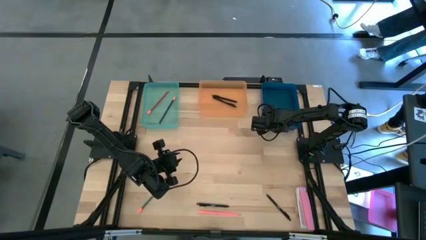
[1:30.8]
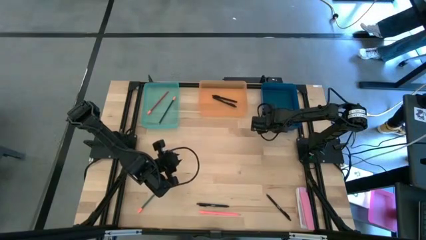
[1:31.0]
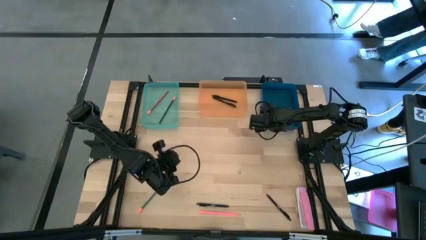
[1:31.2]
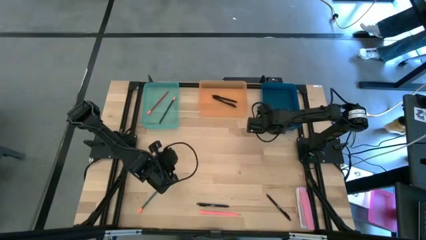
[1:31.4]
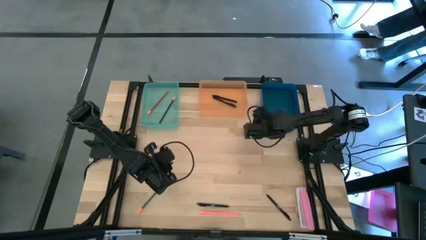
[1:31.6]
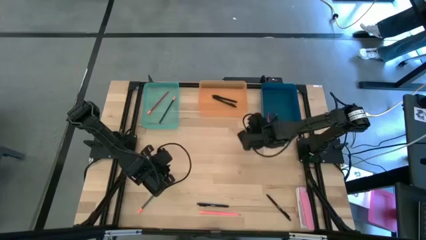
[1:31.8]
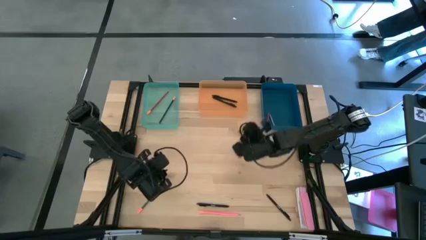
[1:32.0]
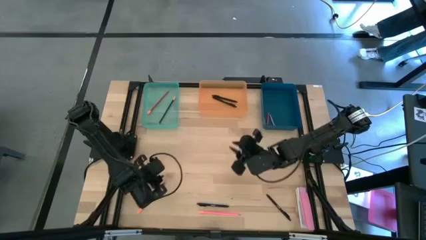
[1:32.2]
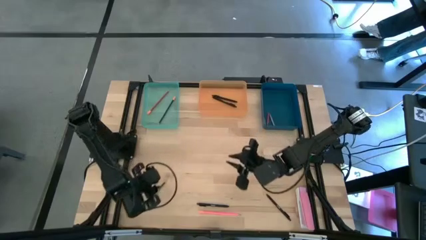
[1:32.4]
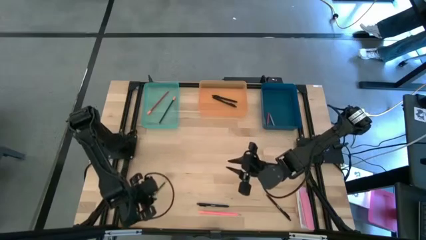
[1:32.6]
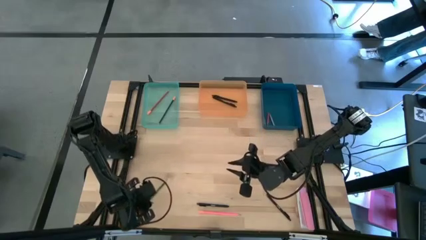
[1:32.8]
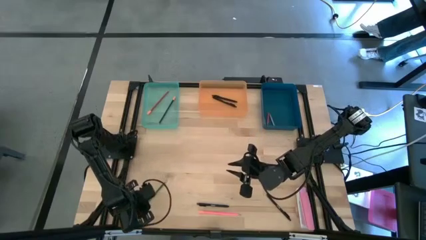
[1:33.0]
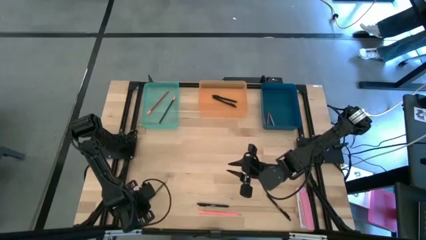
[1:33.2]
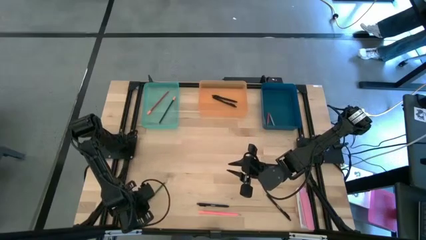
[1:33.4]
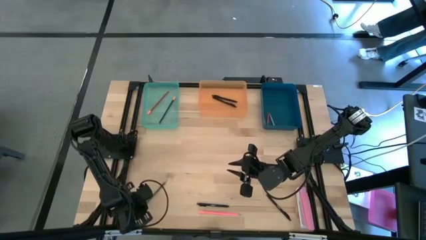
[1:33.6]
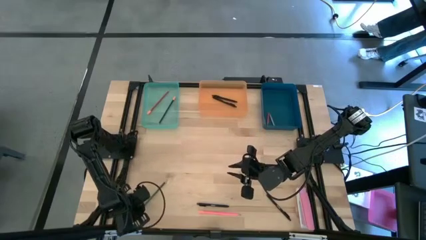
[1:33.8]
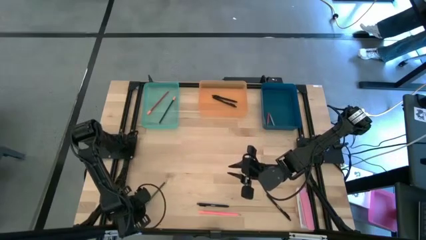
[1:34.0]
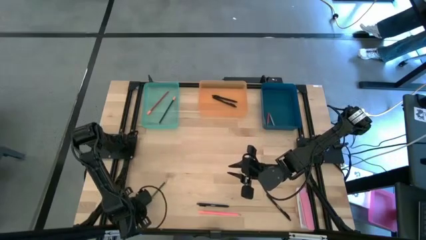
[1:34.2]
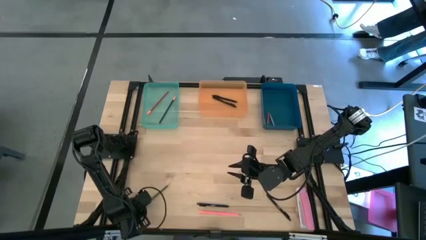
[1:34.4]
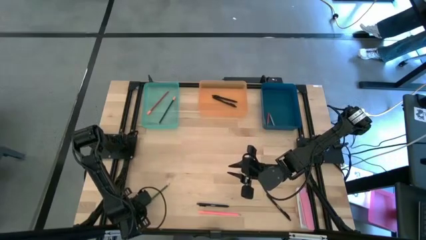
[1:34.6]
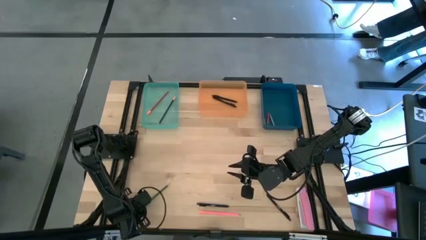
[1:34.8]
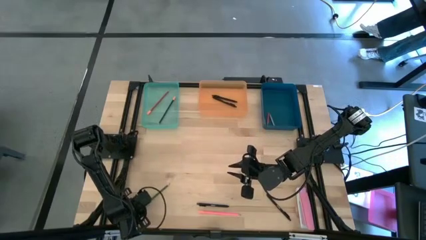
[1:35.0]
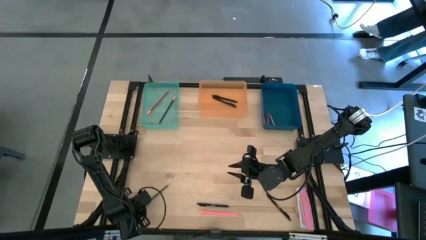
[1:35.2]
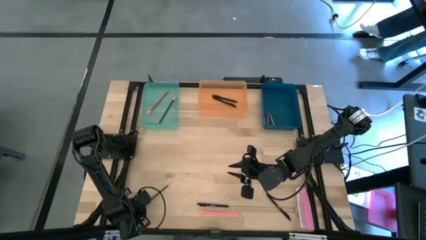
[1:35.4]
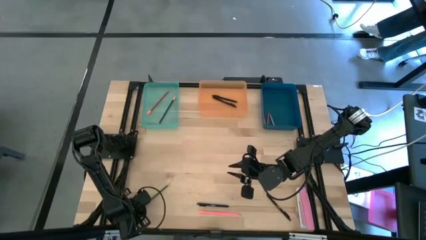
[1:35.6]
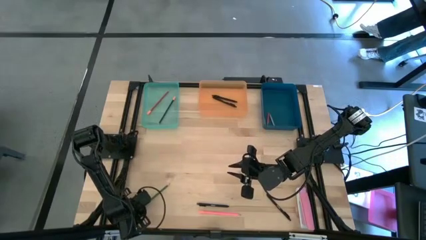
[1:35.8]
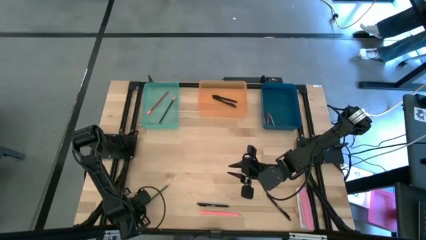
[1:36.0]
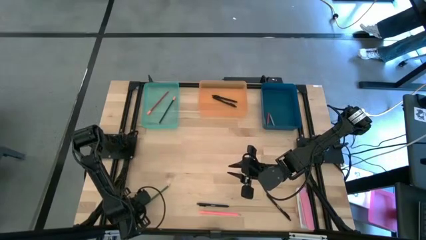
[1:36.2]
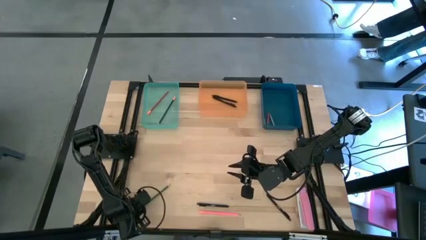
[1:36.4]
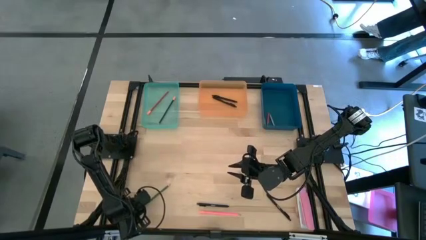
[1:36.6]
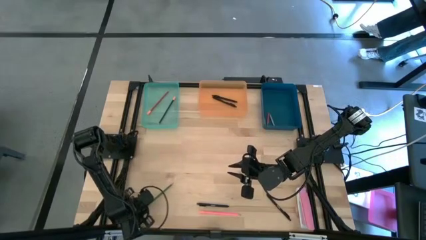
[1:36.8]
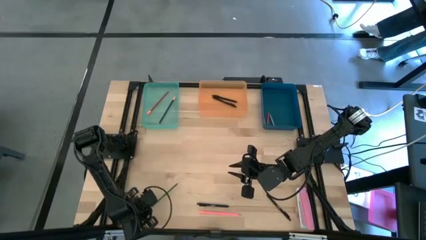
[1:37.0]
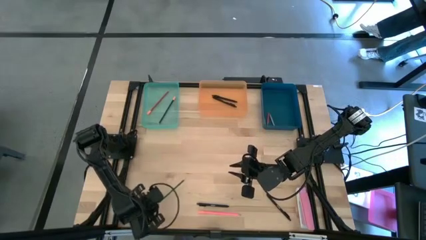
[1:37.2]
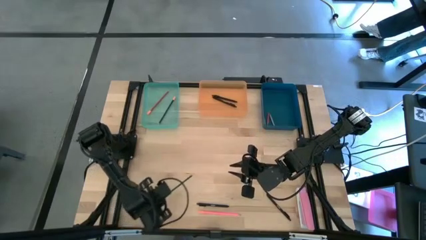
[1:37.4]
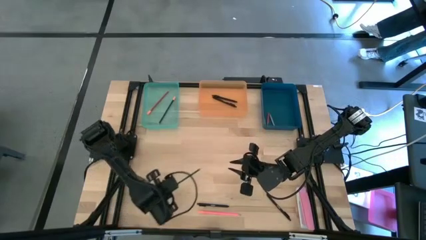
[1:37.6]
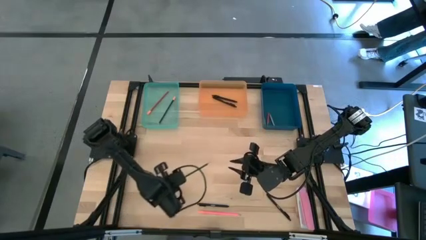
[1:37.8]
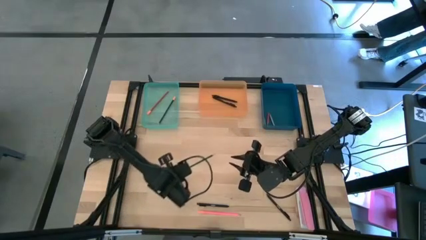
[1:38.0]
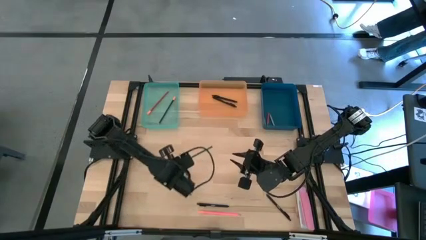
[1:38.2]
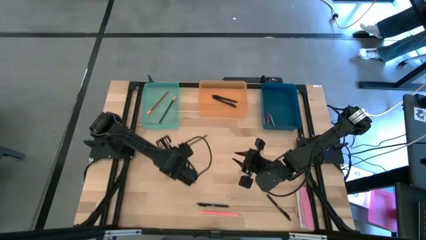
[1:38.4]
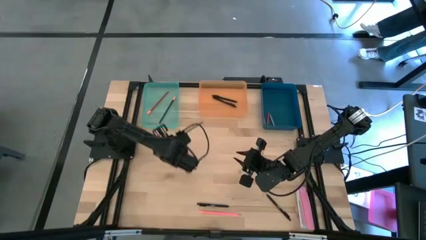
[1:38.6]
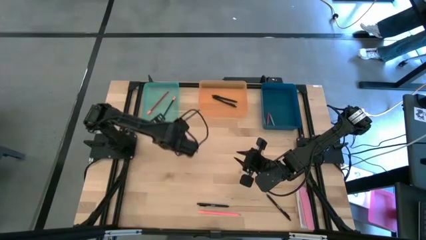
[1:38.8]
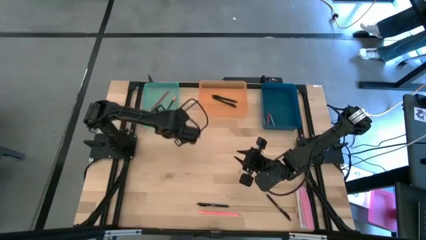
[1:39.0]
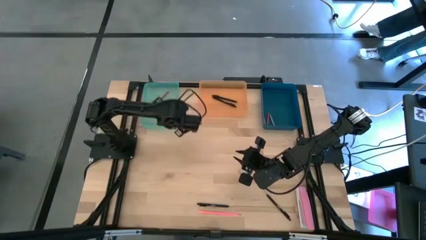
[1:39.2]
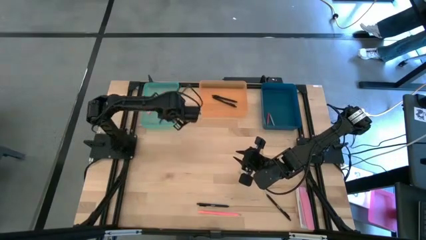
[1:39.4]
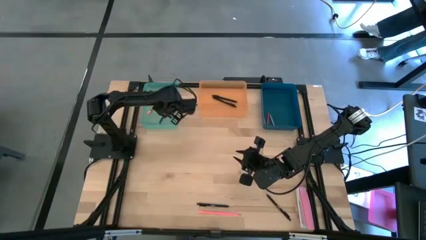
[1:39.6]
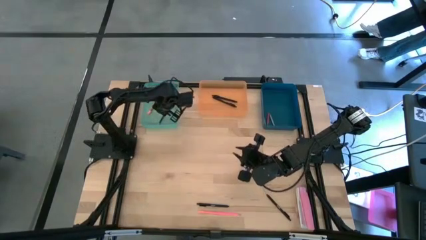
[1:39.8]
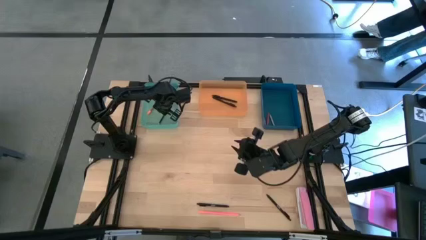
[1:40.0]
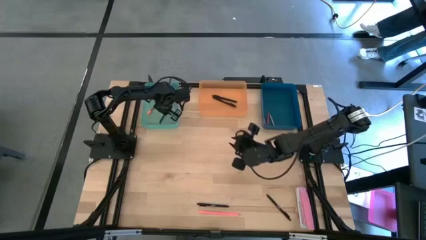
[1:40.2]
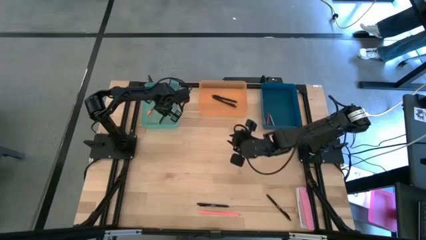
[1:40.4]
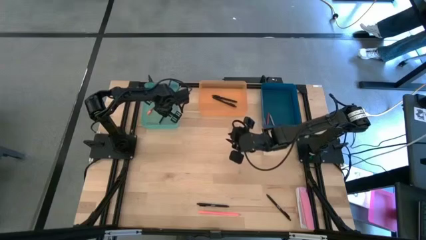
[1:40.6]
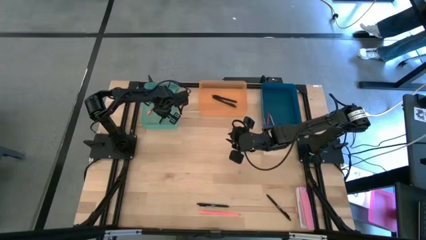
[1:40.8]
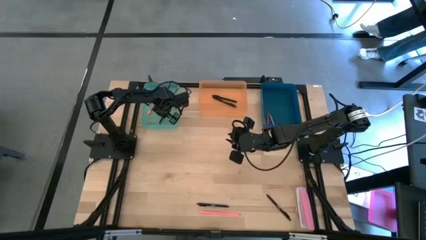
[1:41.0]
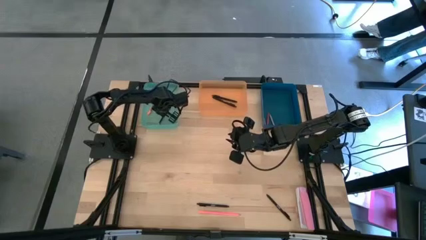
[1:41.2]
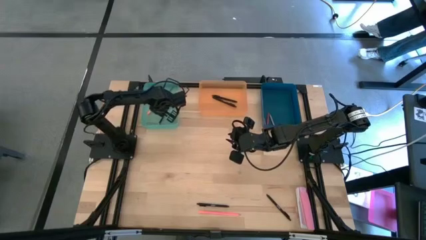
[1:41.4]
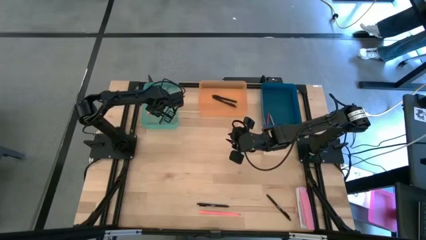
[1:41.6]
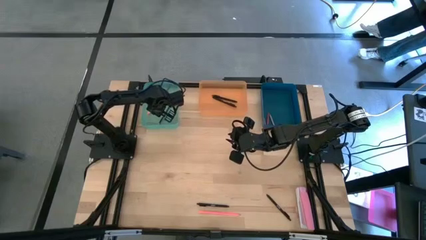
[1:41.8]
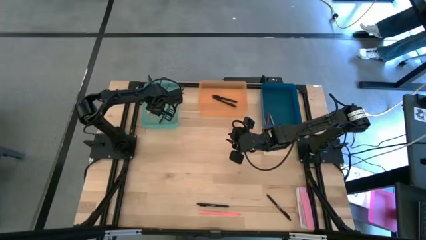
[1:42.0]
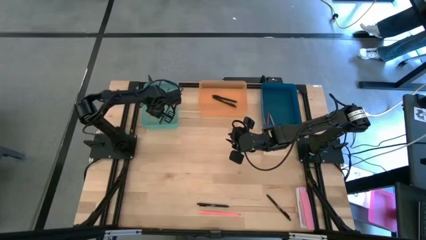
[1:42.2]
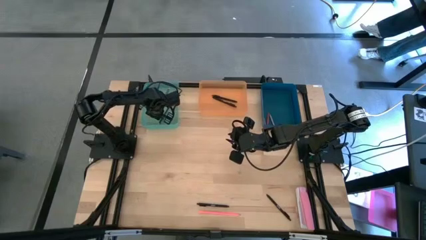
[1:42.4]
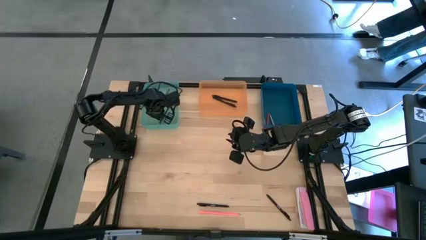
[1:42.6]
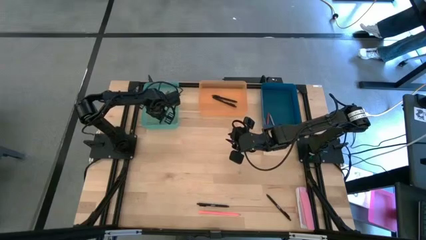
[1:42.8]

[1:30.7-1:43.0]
Task: Sort crayons/erasers/pens/pencils in bins
Put the green pencil into the light blue bin
